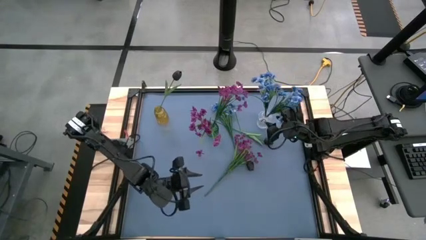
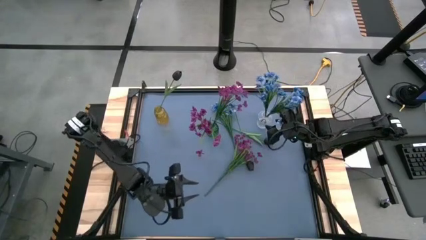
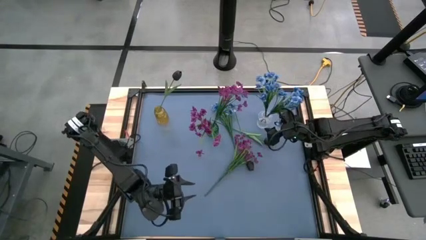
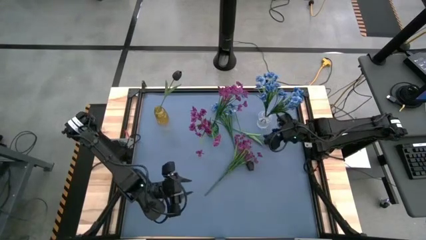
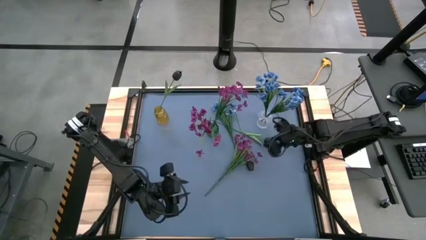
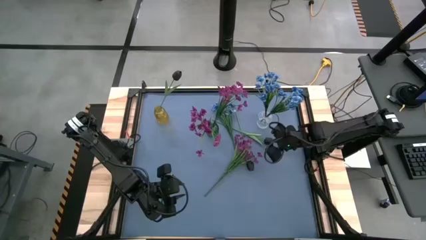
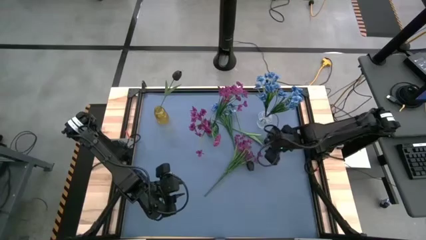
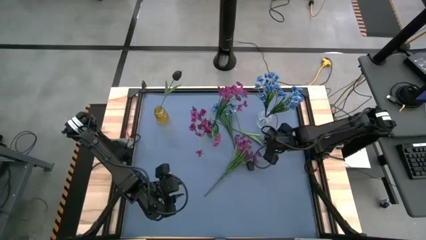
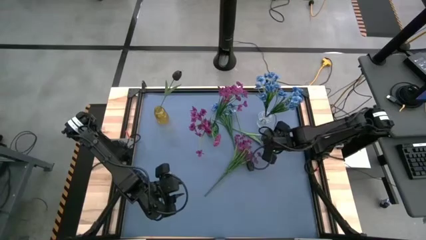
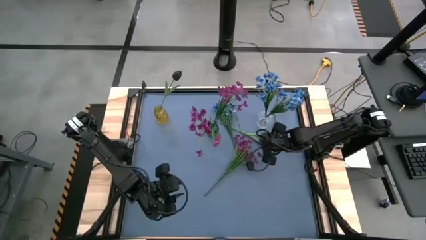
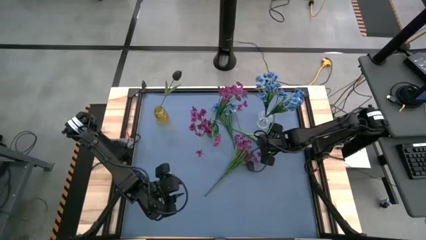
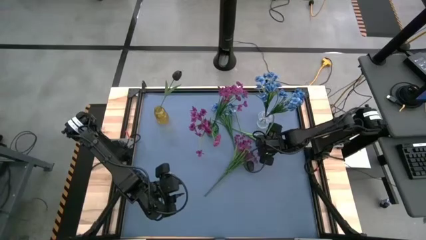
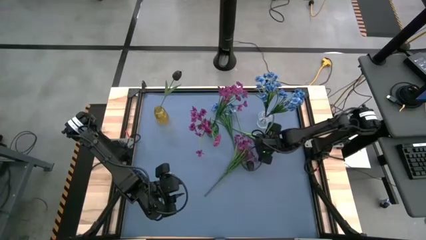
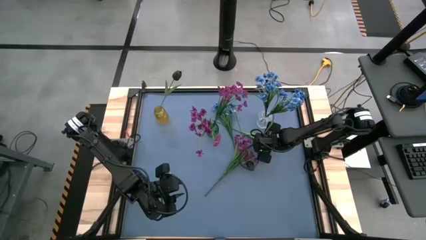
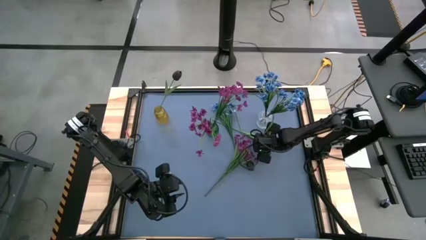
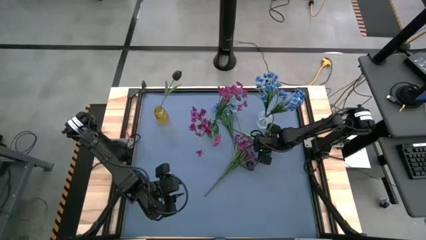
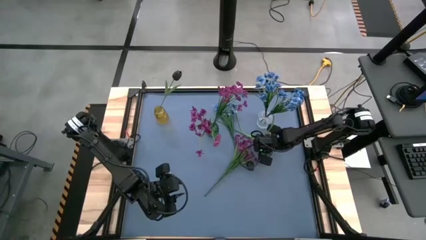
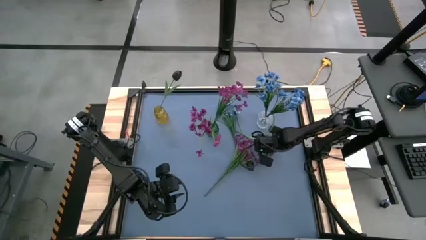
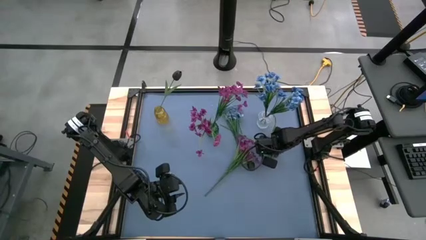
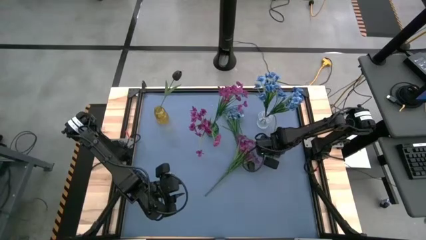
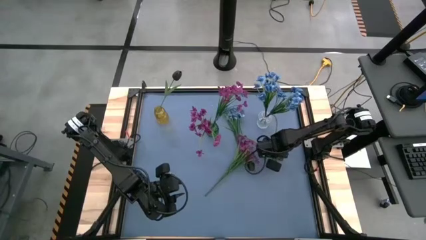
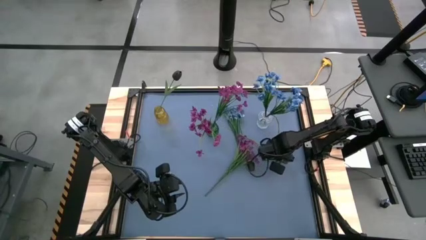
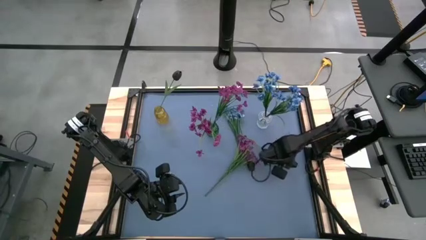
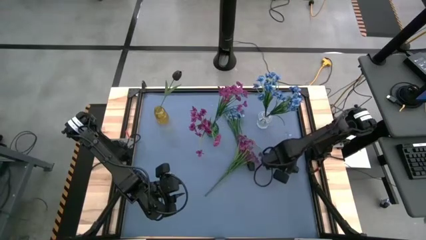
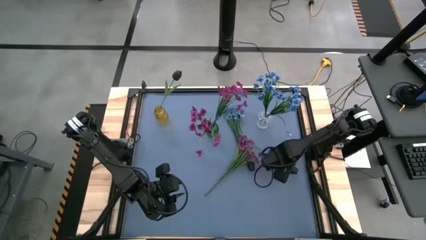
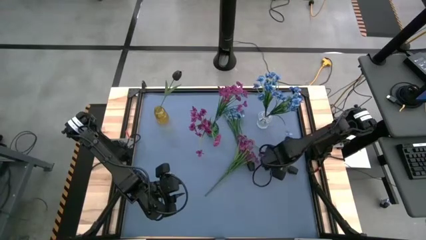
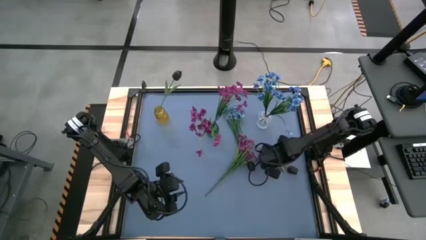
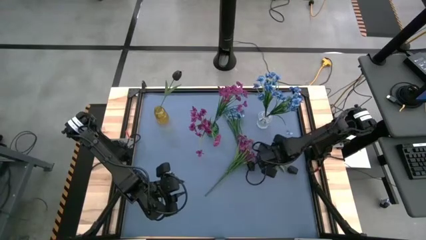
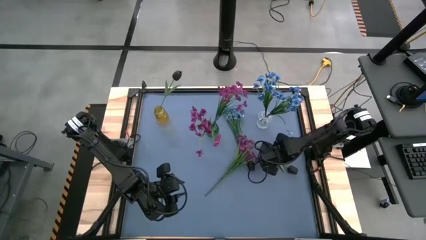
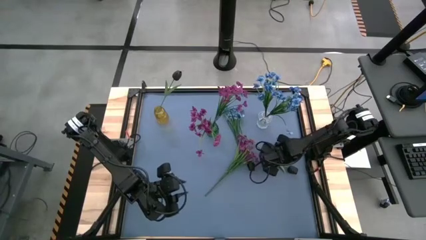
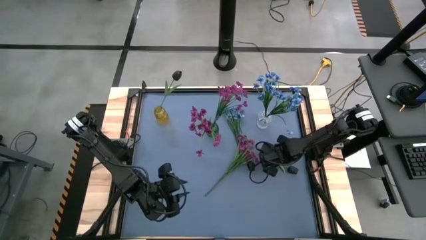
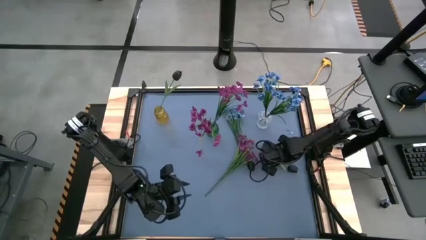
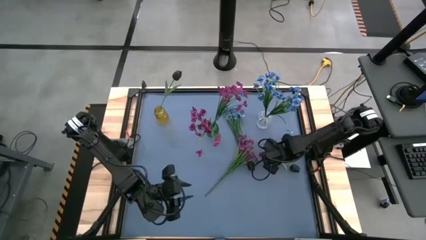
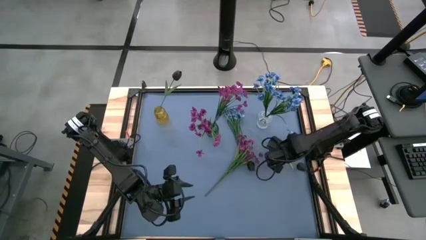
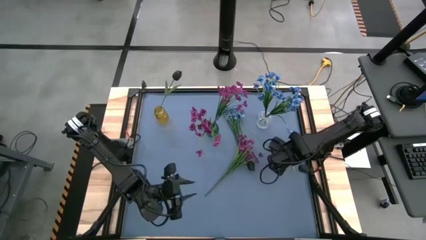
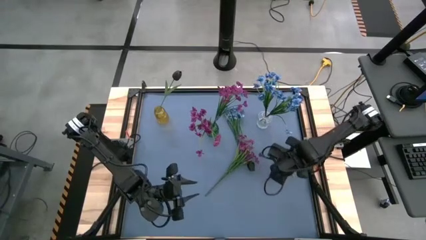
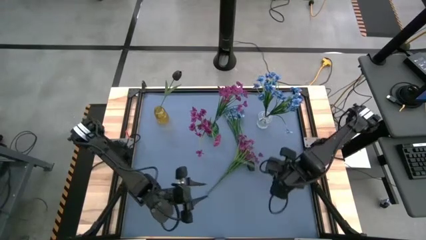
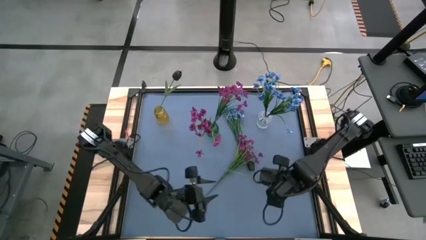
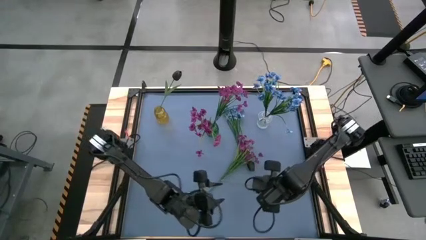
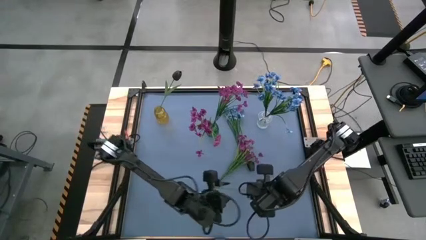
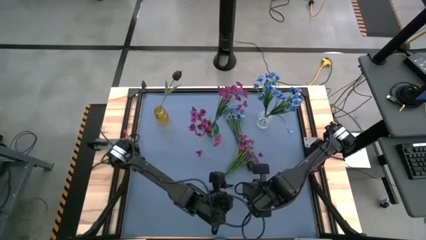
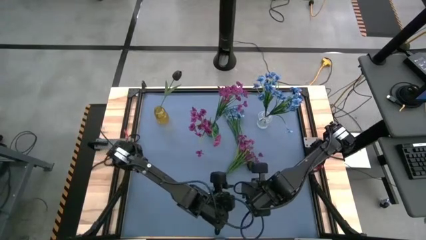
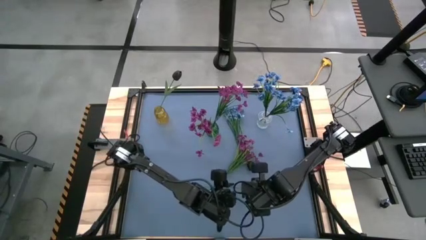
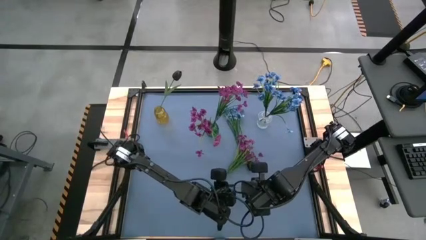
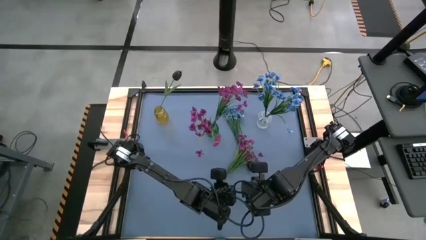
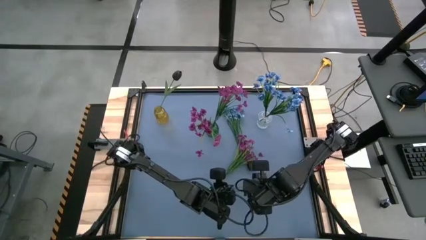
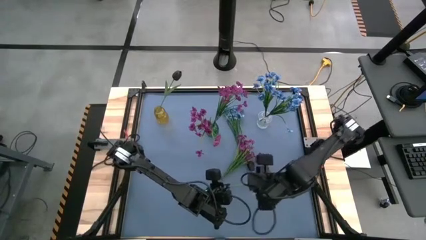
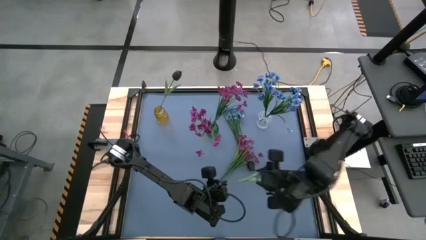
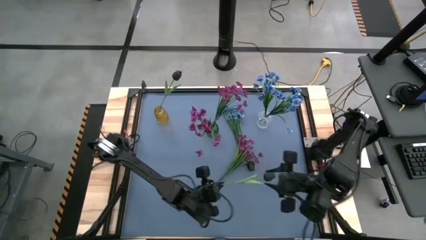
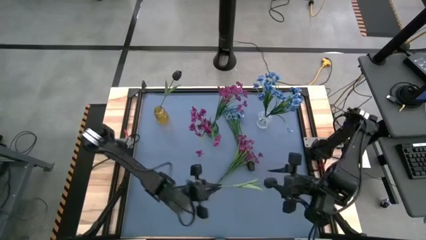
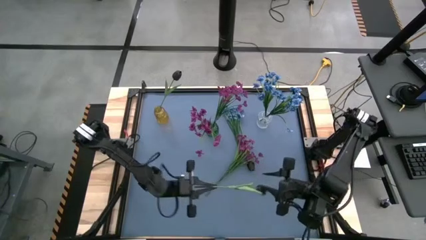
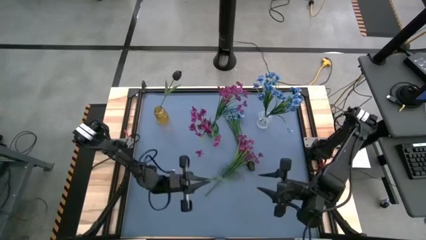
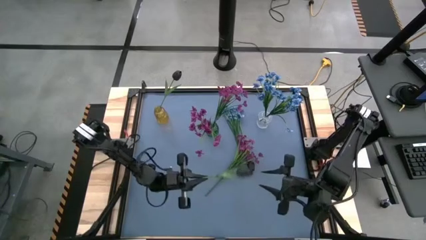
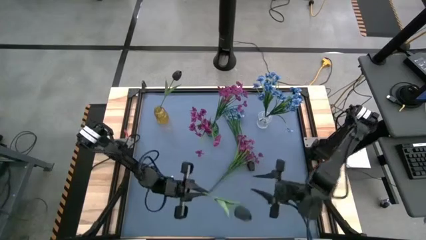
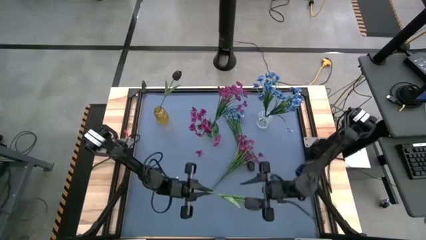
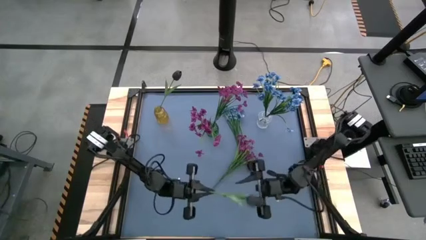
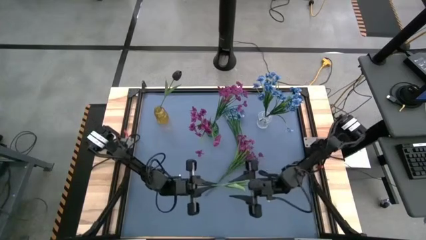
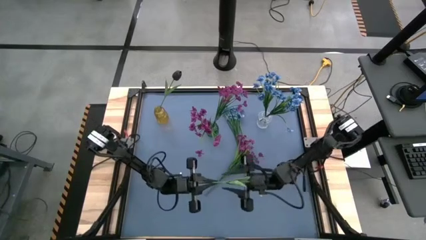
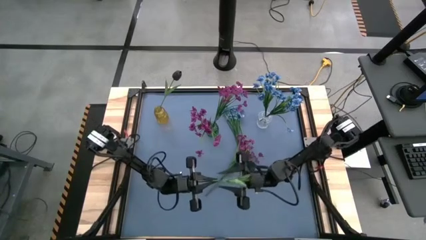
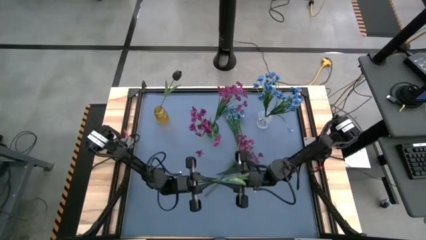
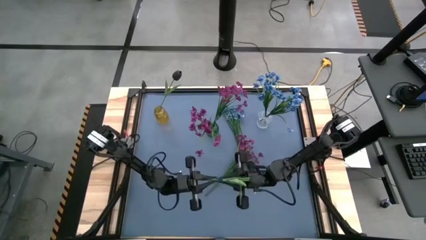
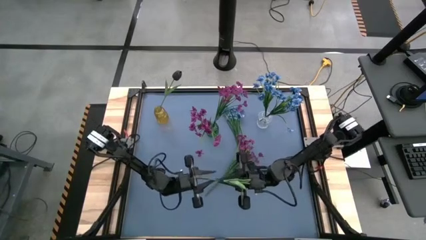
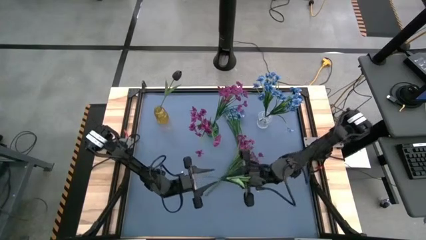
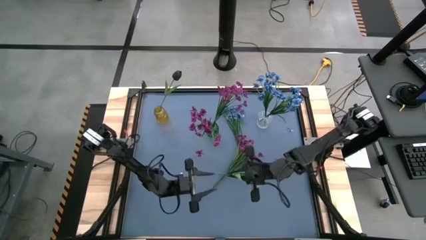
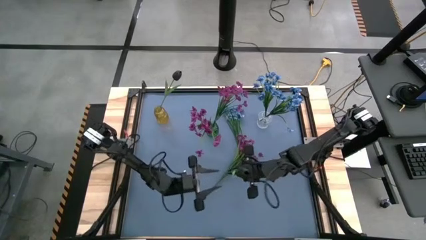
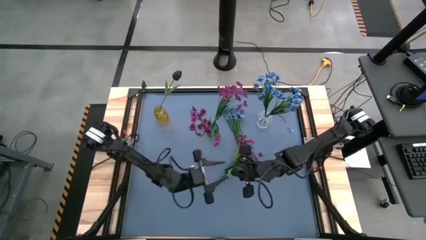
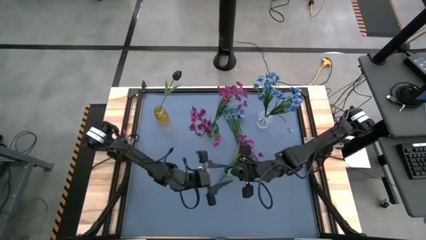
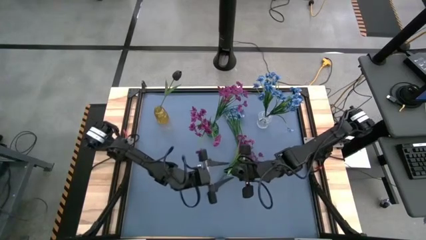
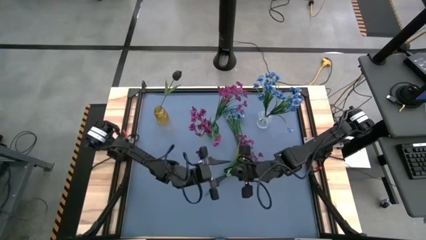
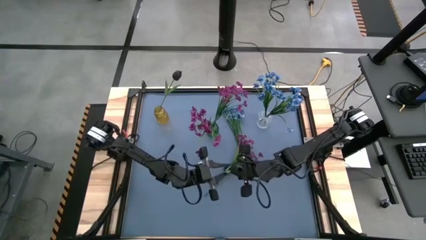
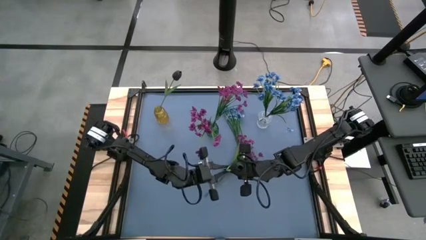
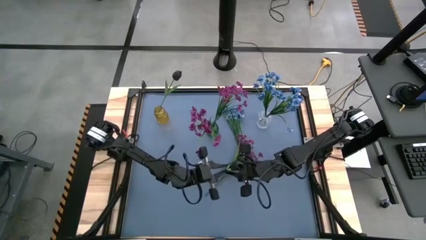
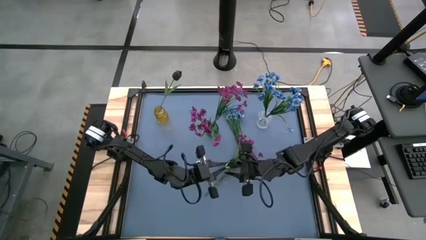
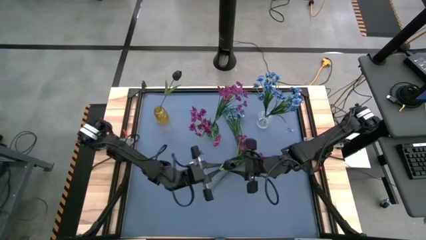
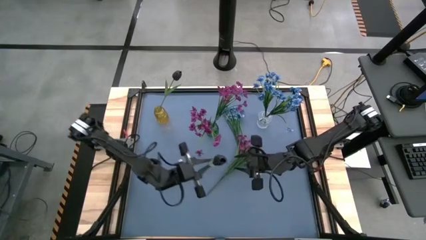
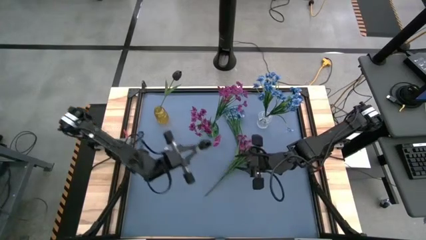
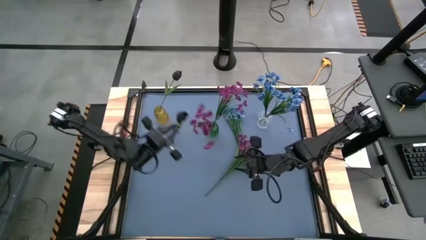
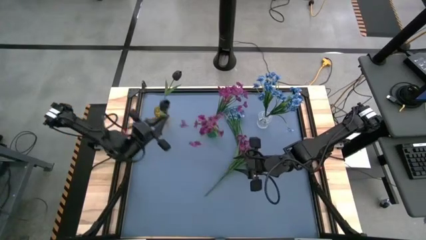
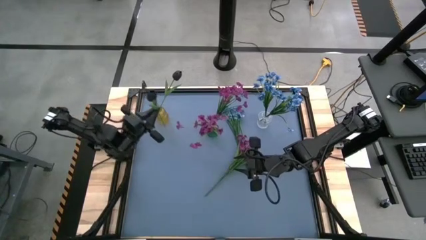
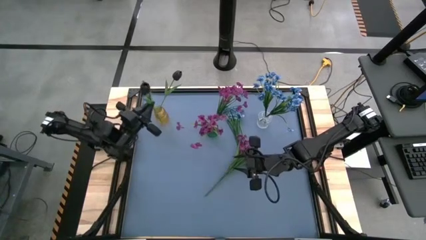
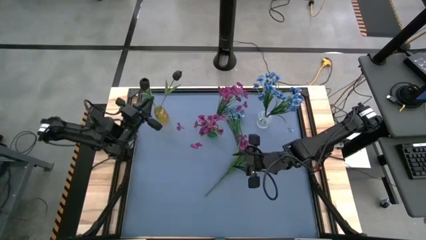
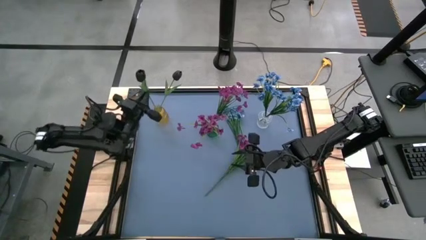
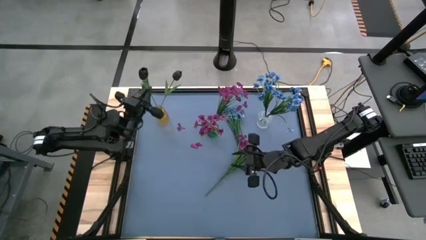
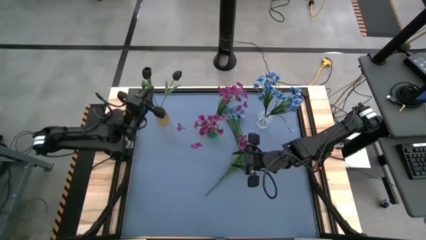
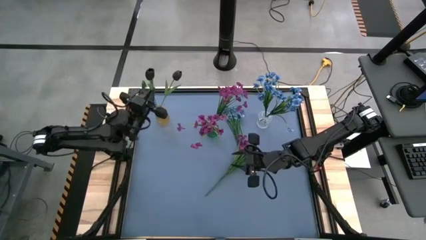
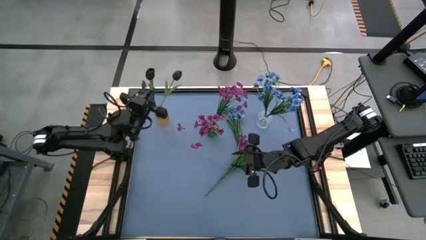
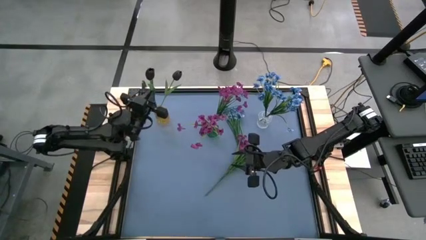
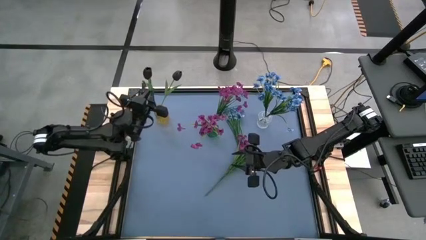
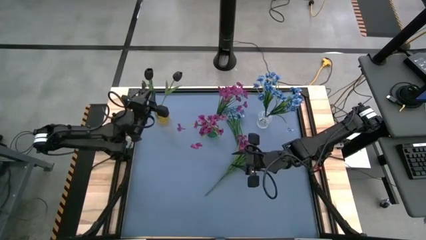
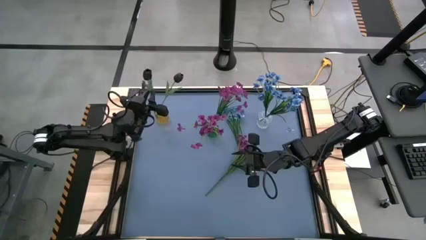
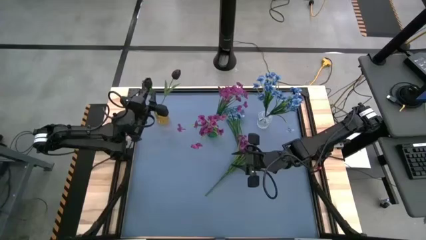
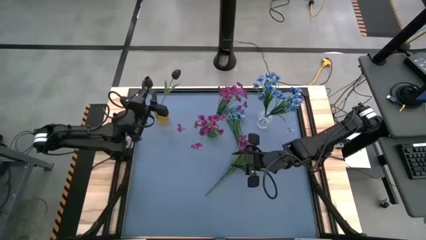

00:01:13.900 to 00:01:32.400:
Task: Sort flowers into vase by color
Put the right black tulip into the yellow vase
